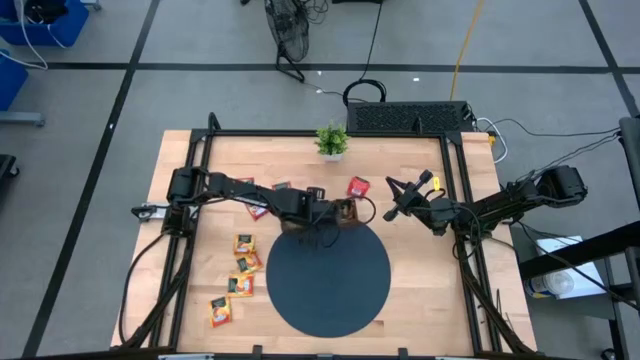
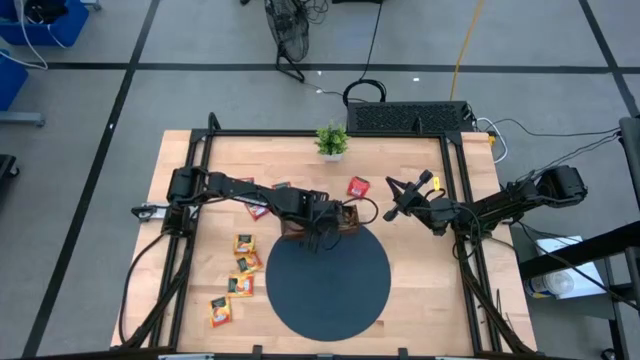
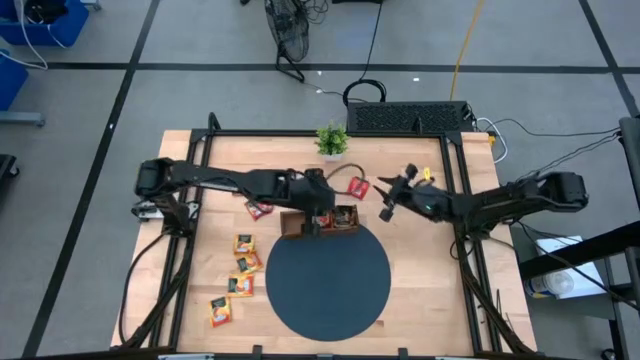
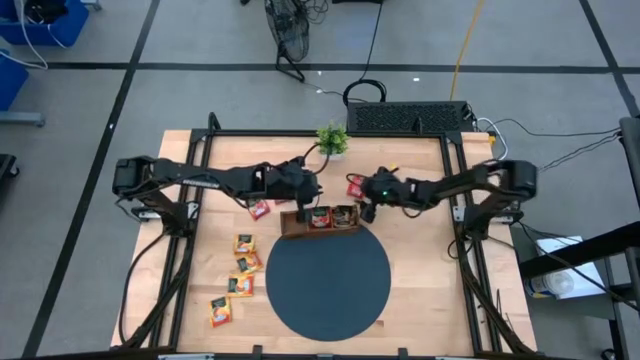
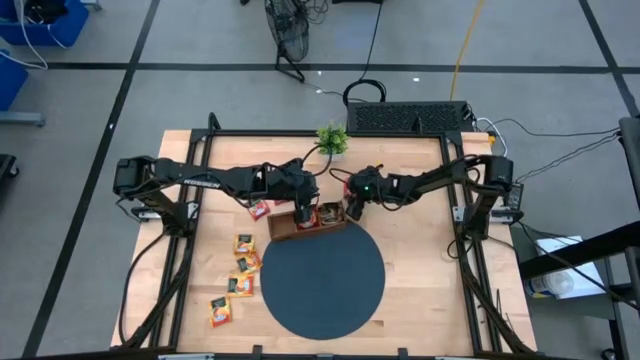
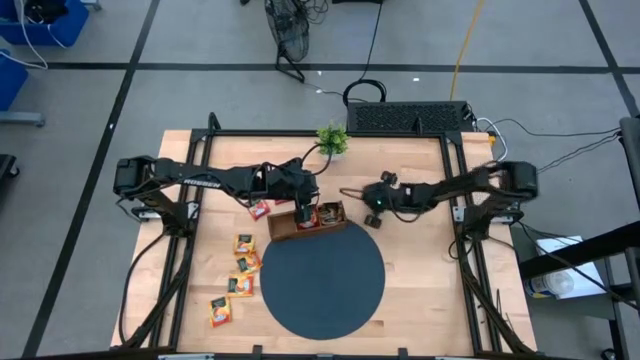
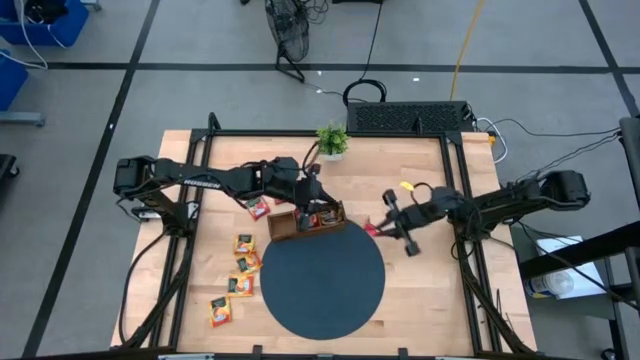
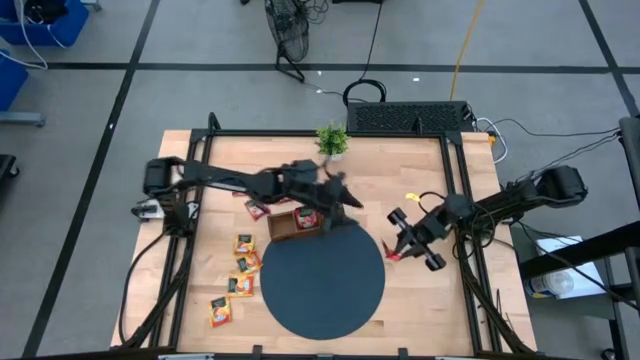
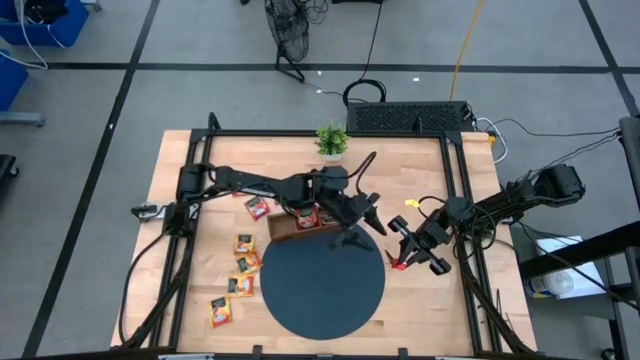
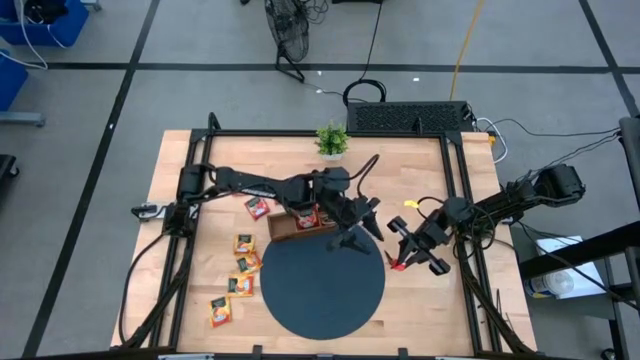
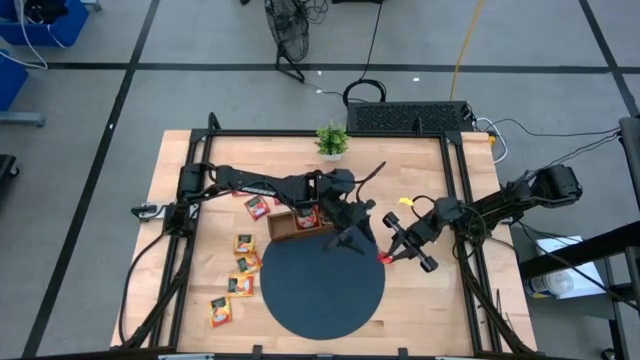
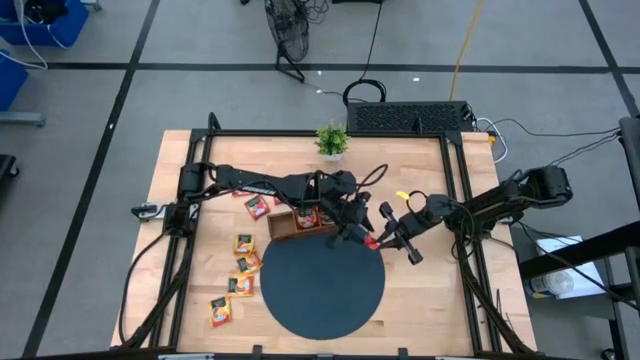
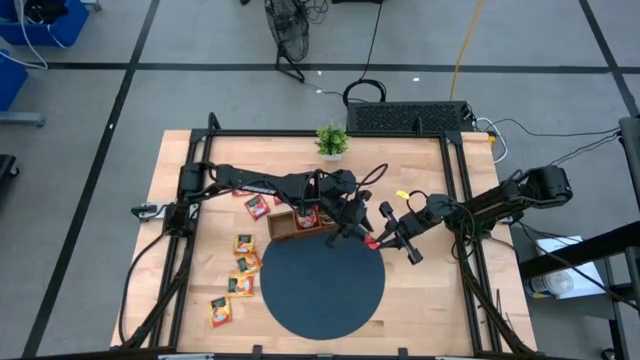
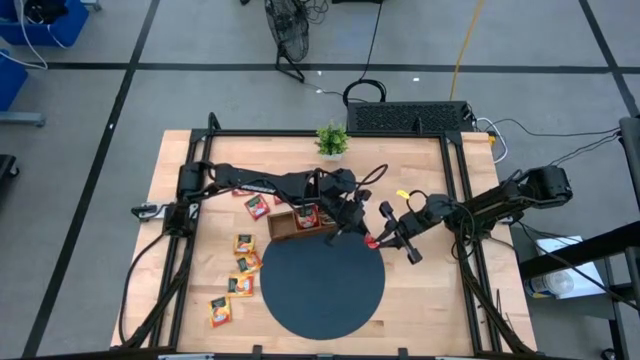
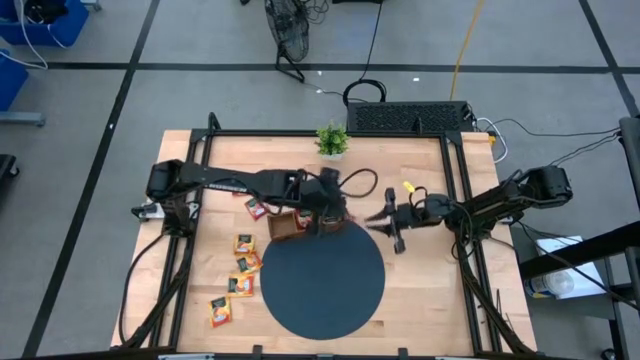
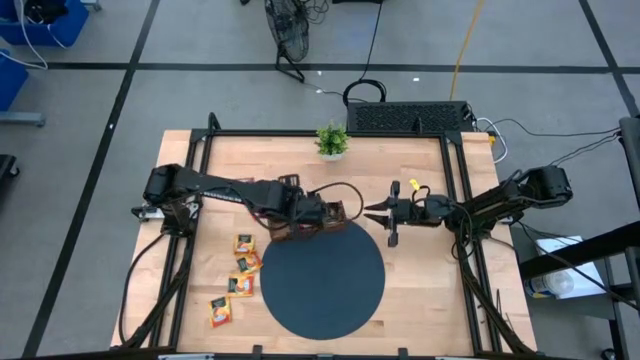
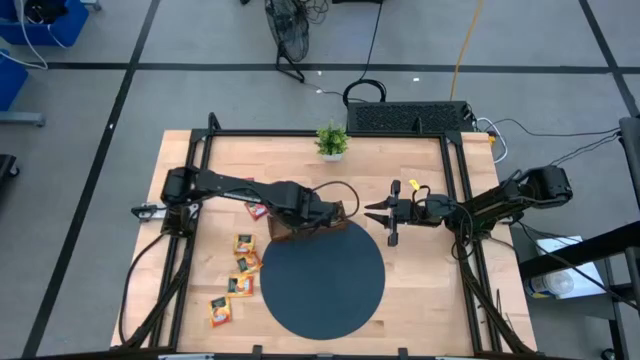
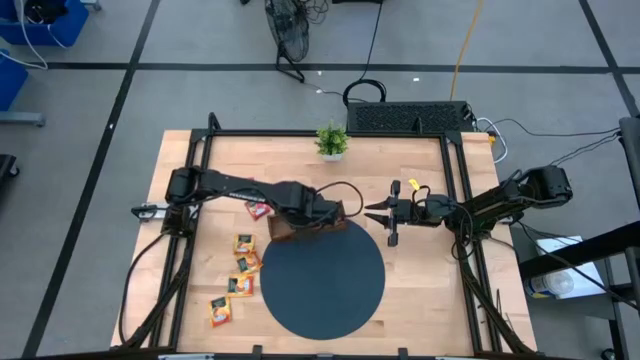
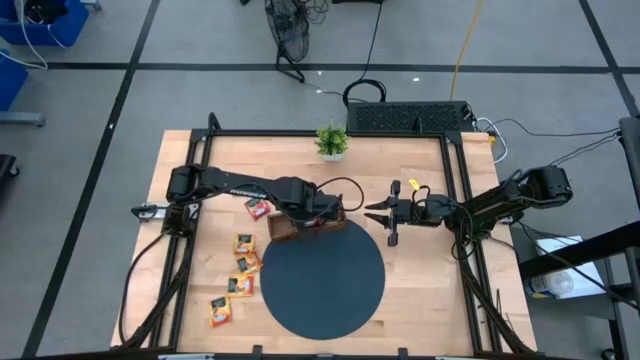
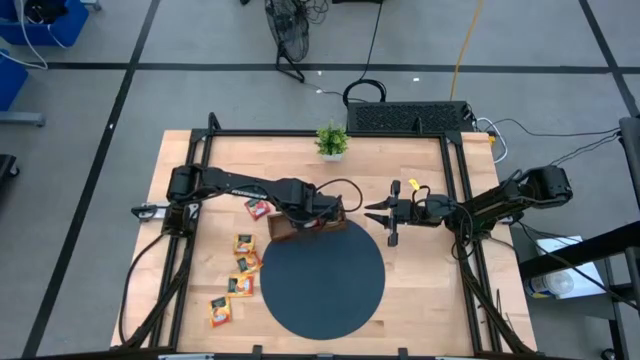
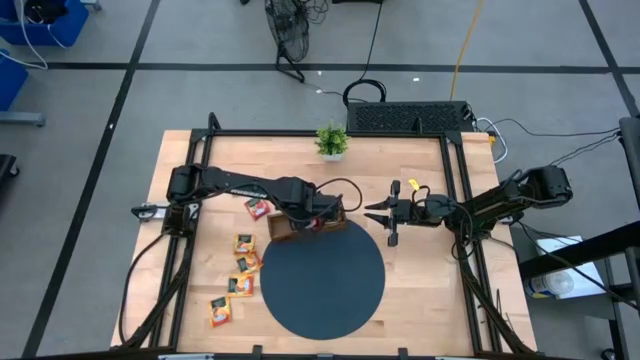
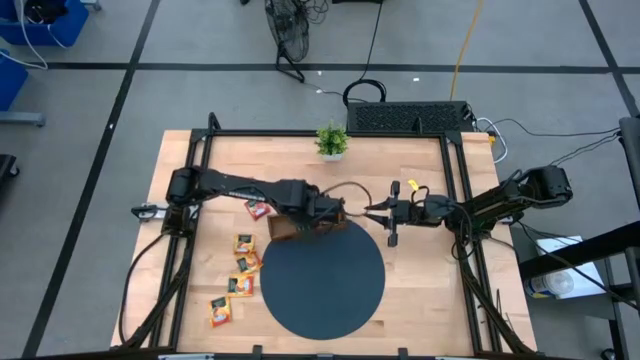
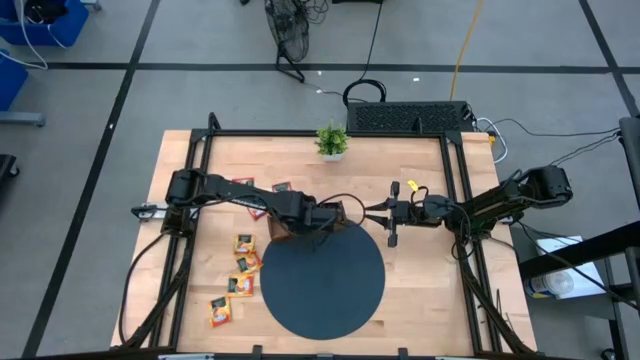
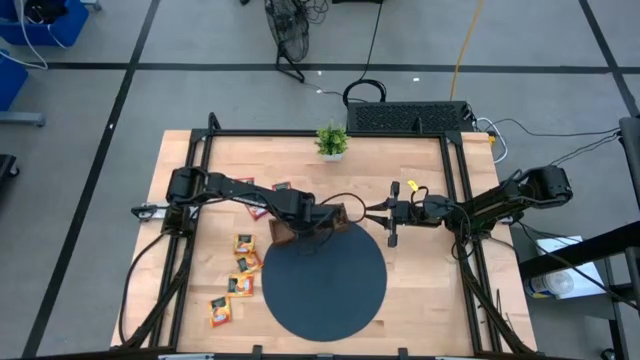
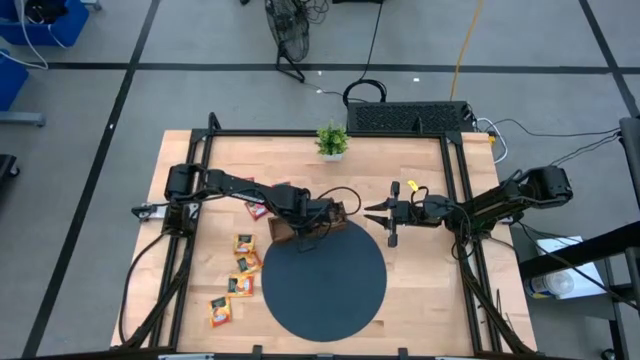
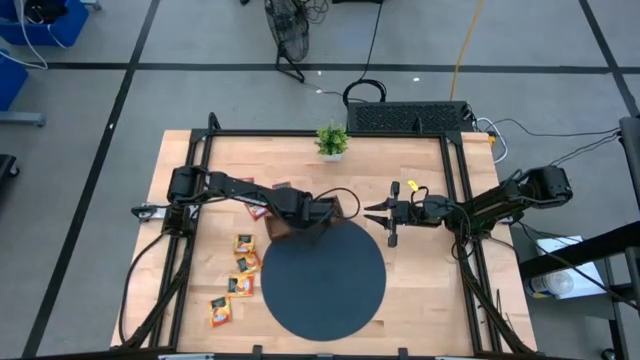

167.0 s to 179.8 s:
Task: Pick & Place Tea
Put the red tea bag into the middle slot of the wooden organizer

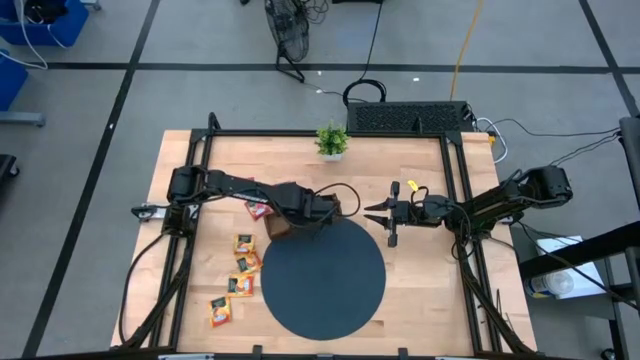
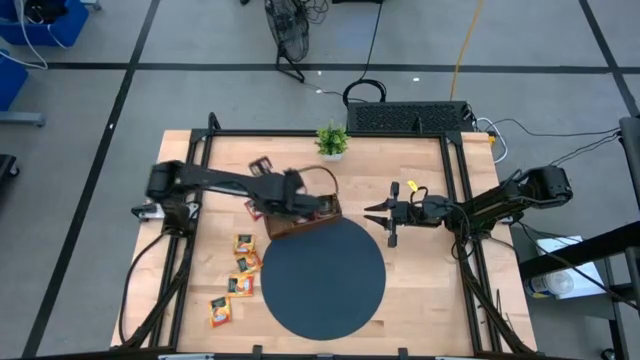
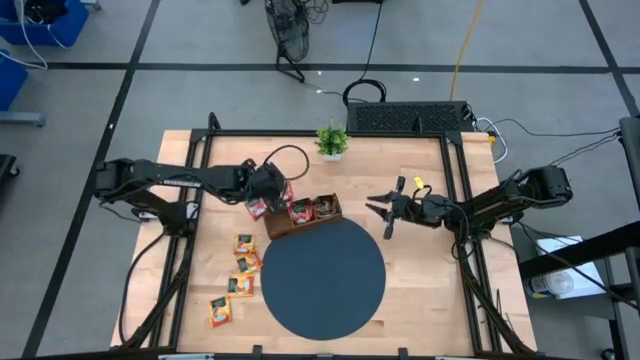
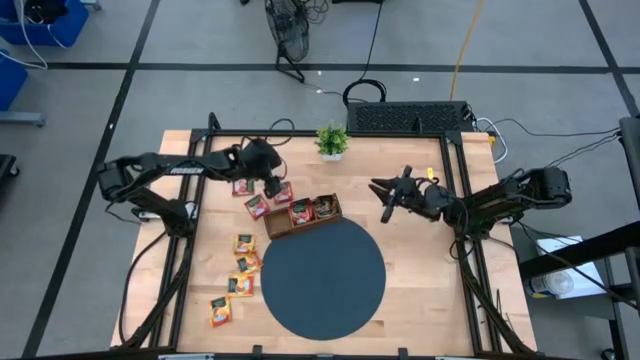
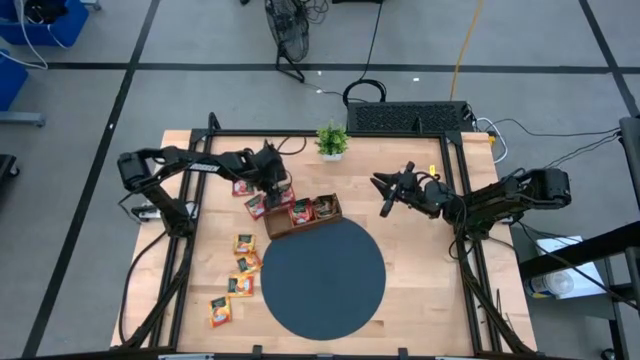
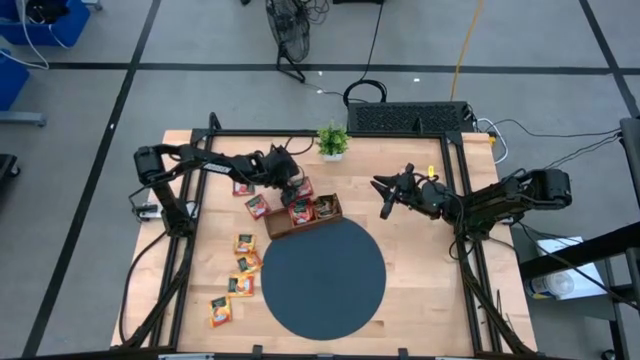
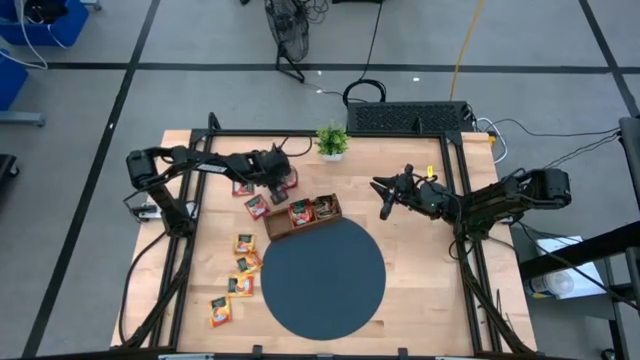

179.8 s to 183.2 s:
Put the bottom right red tea bag into the middle slot of the wooden organizer

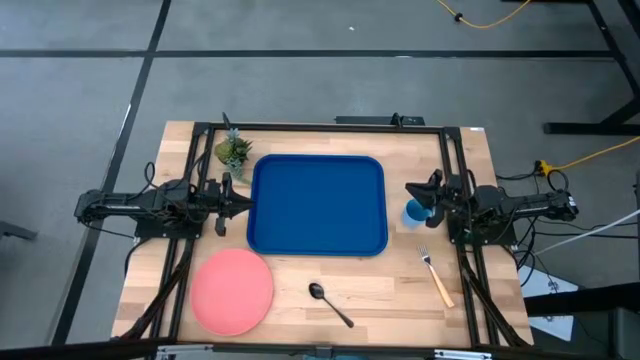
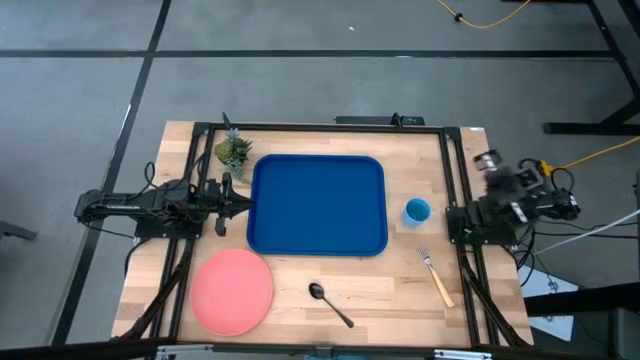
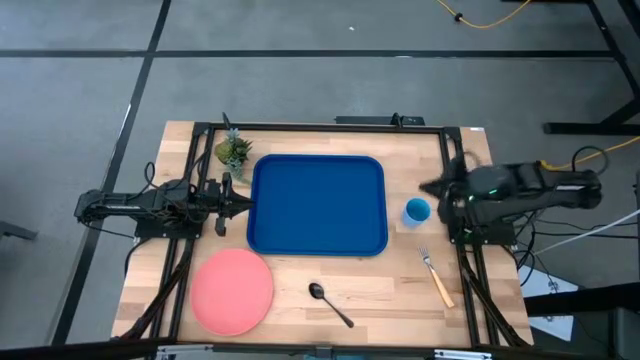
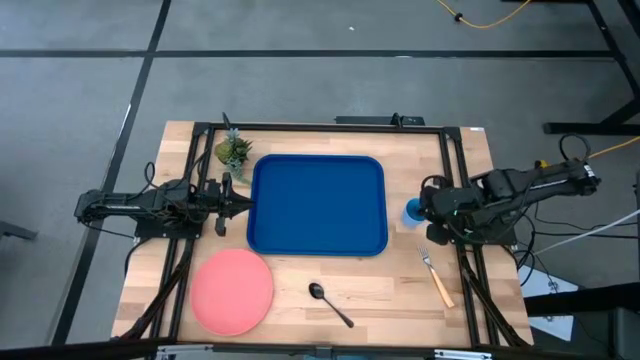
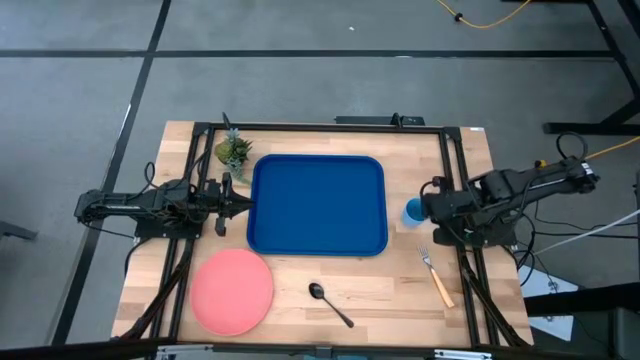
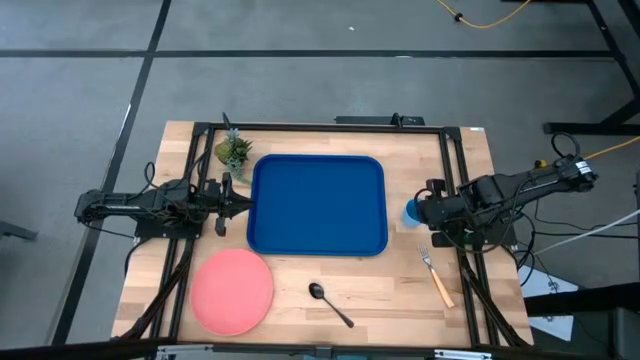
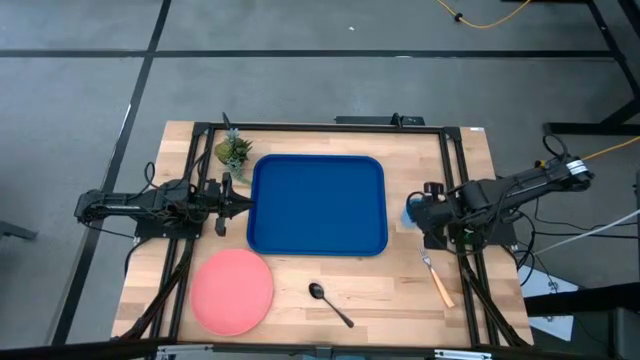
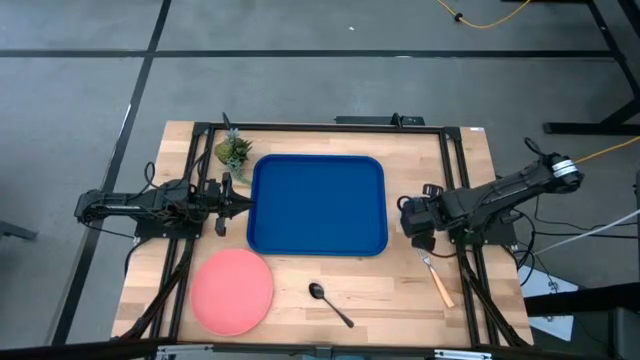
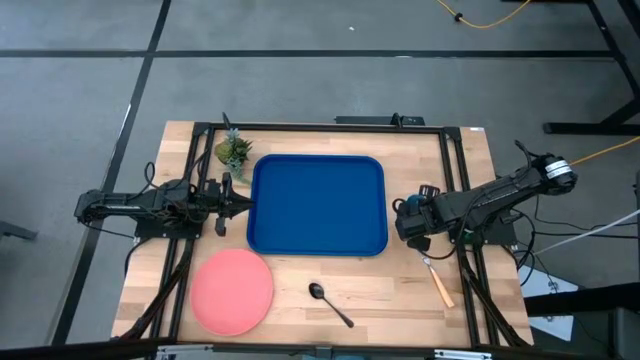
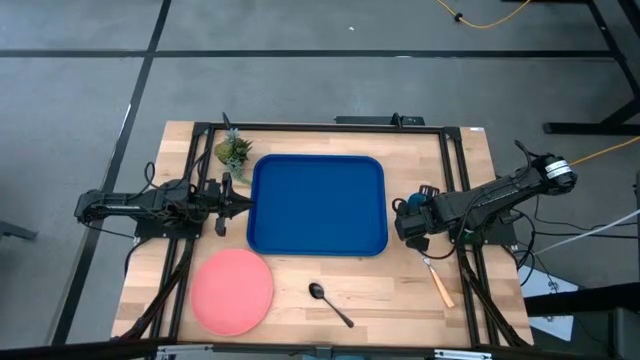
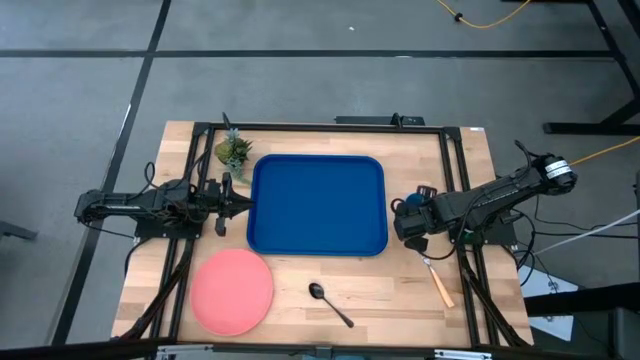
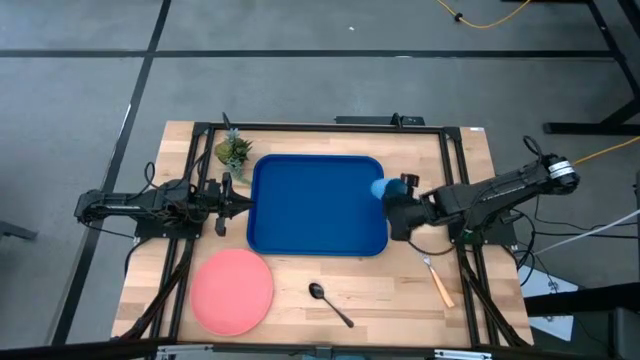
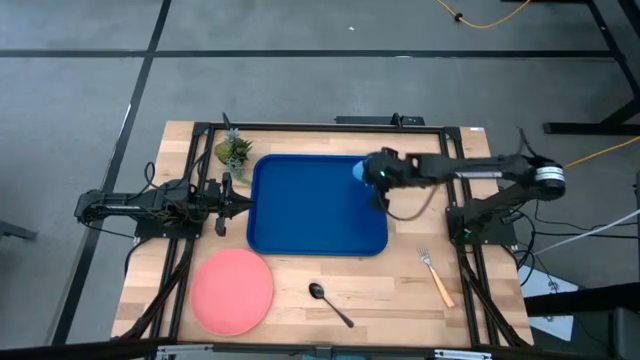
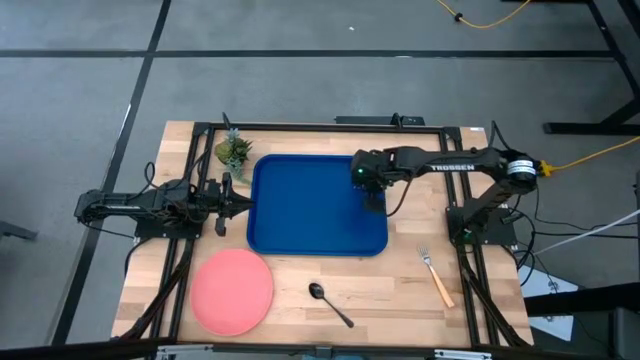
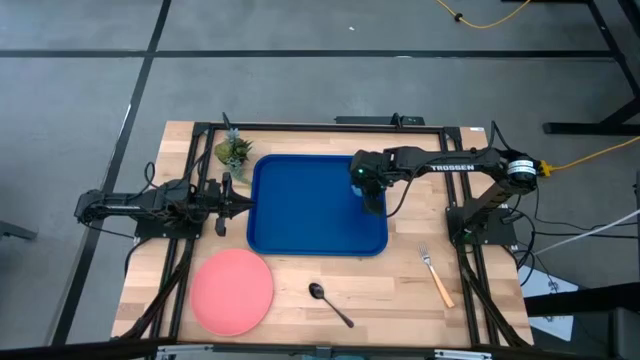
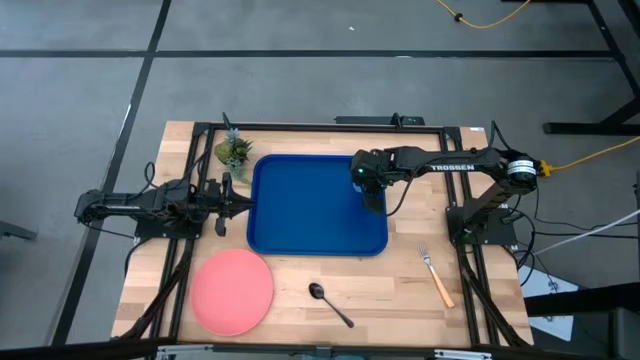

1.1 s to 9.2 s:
Task: Pick and place plate/cup/fork/spoon on tray
Put the light blue cup on the top right of the blue tray
